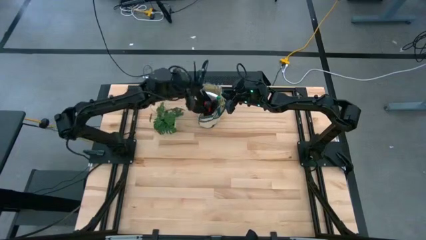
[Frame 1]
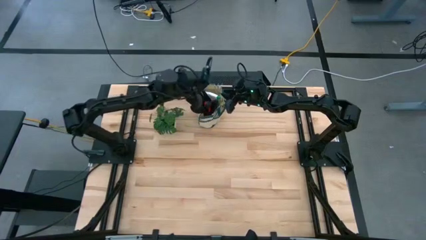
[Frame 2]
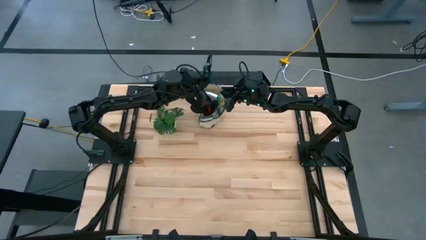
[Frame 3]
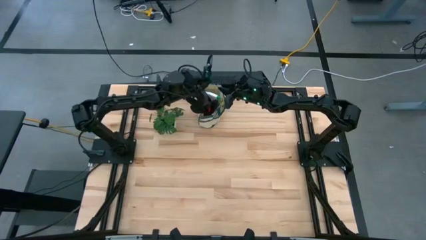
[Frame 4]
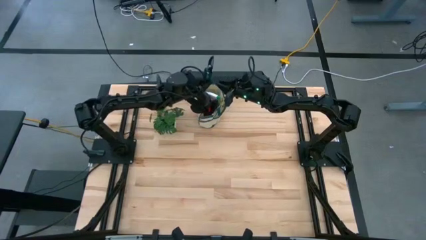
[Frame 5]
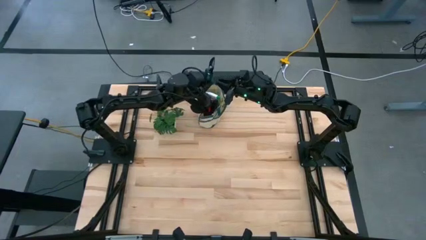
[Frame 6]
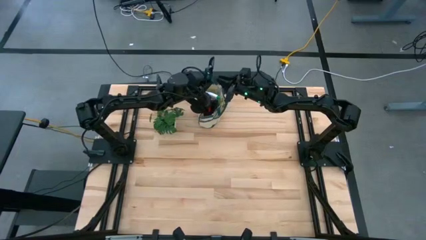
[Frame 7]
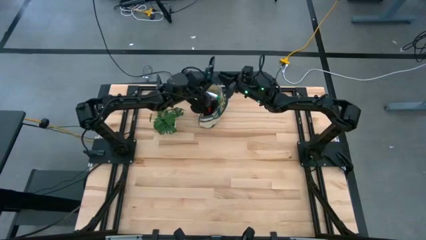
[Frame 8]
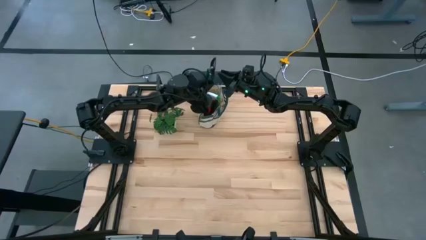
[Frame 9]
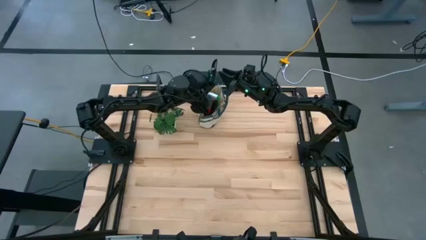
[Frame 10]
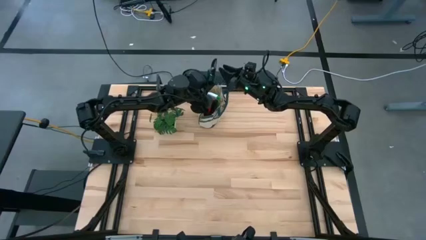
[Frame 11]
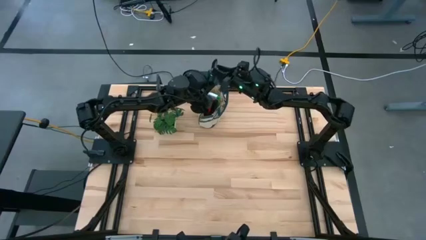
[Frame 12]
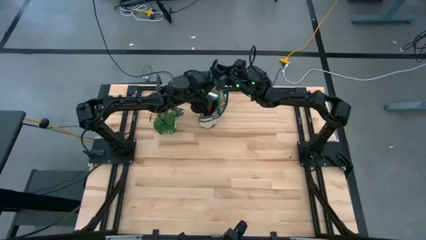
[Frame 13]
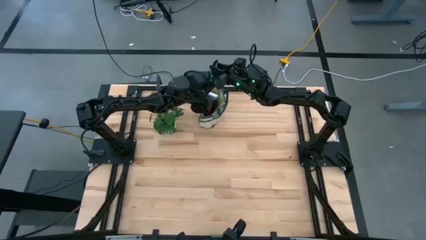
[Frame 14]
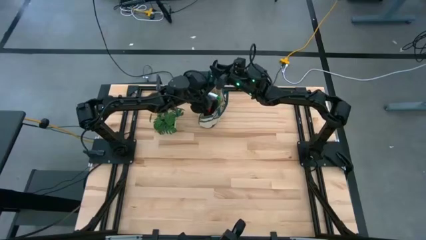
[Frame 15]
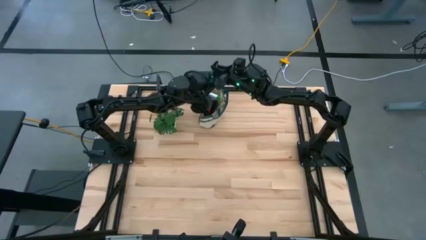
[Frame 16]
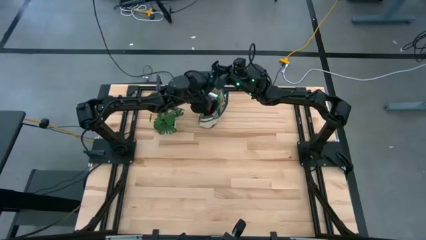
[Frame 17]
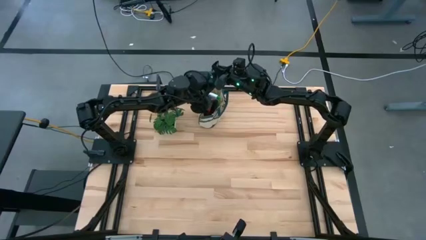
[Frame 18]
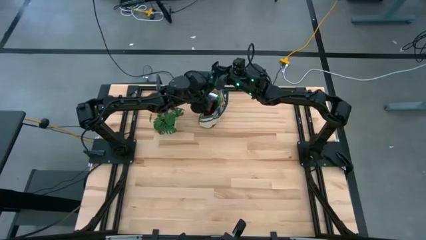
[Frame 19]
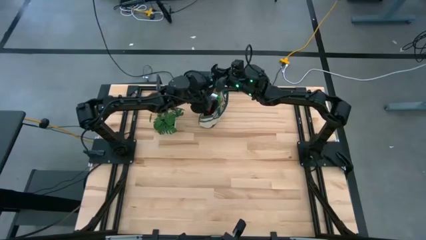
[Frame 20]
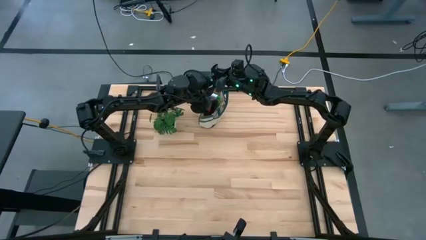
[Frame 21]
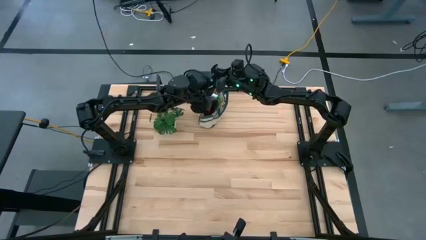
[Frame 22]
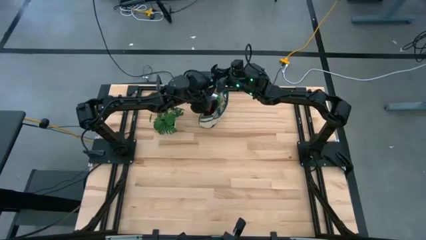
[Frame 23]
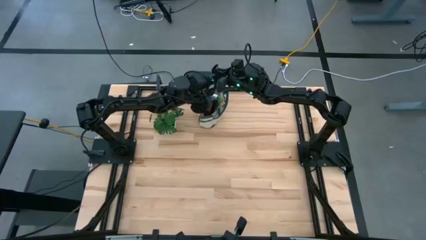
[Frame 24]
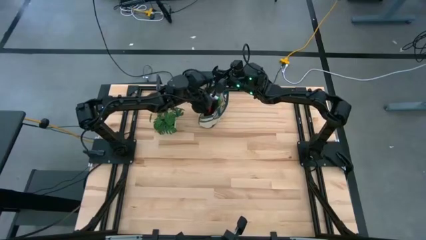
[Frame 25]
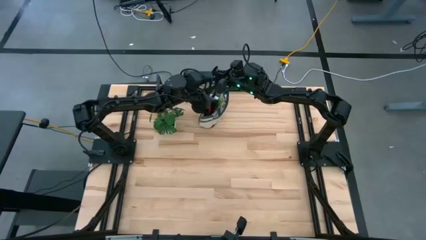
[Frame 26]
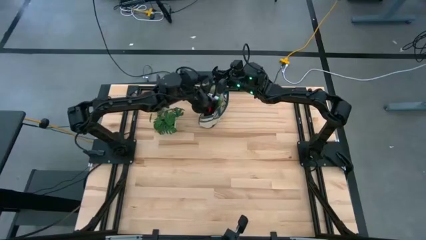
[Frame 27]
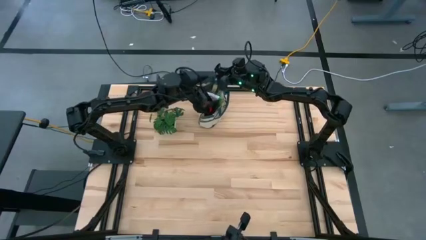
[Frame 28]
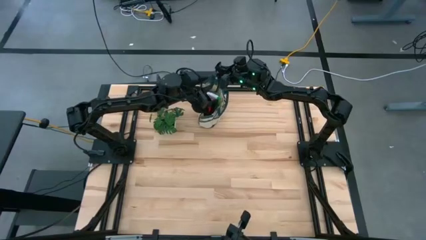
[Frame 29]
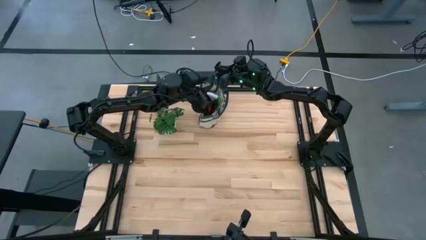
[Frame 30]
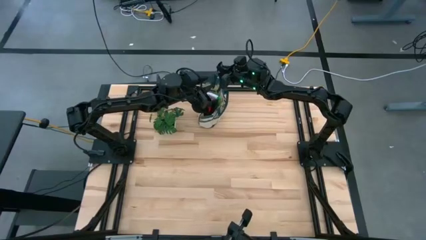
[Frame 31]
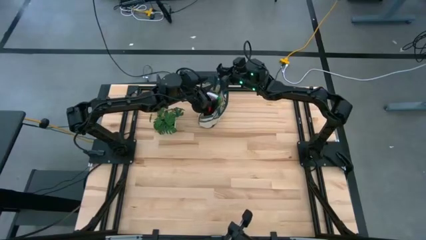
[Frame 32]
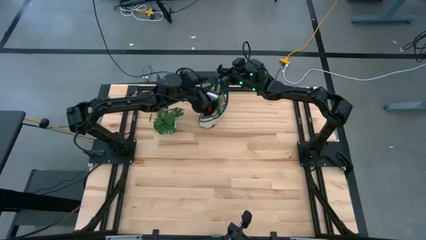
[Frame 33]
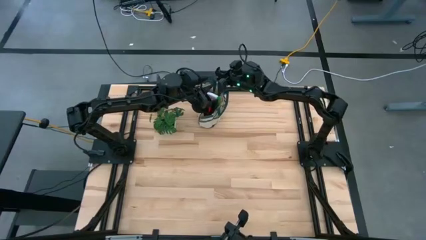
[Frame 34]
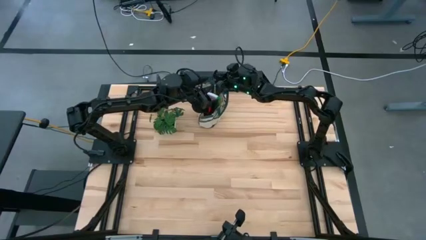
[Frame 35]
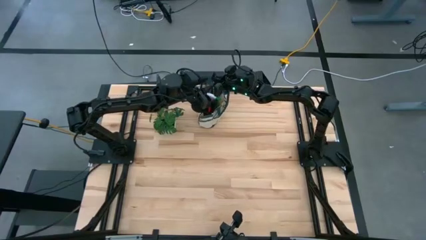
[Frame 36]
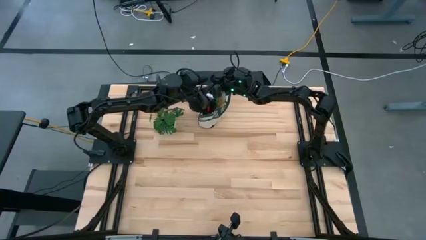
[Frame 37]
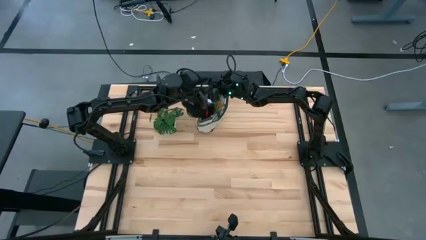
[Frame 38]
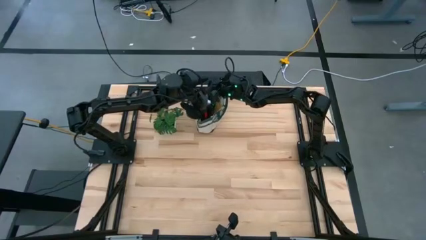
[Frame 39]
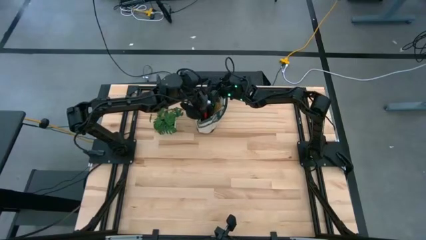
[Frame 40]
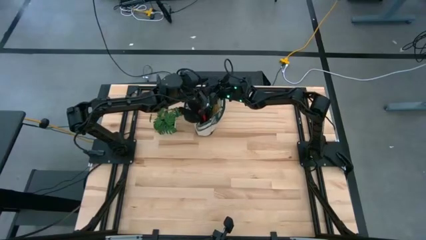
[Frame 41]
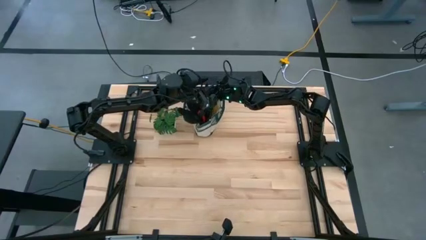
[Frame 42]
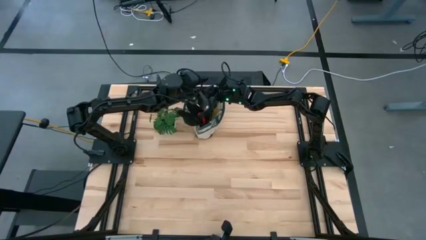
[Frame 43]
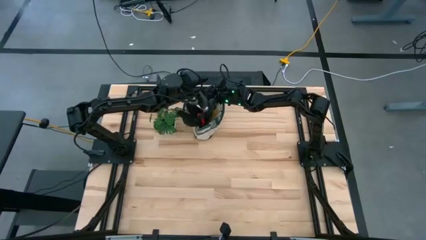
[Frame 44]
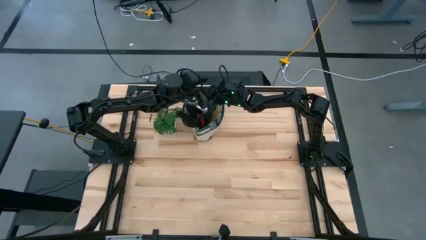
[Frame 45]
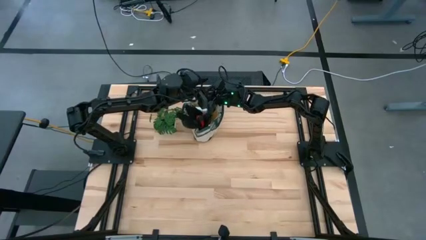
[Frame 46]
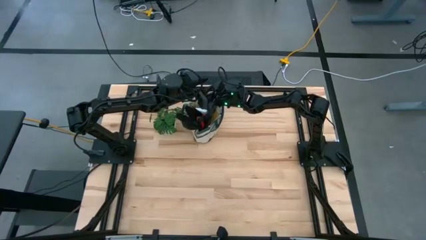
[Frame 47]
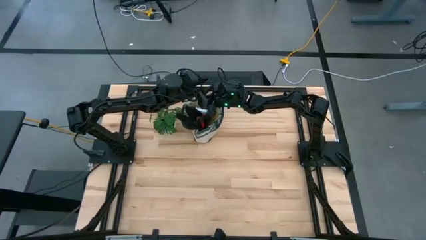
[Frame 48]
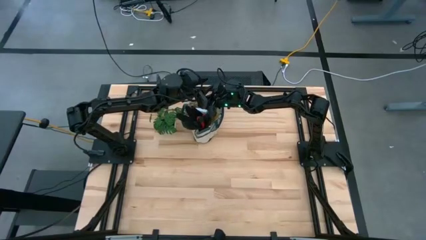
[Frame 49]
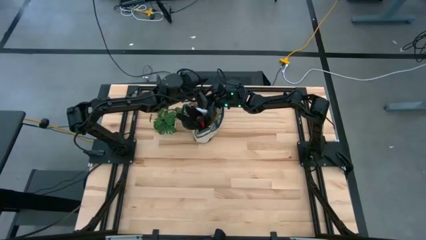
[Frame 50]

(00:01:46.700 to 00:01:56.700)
Task: Pick & Place Garden tools in Gardening bag
Put the green shear scissors into the white gardening bag

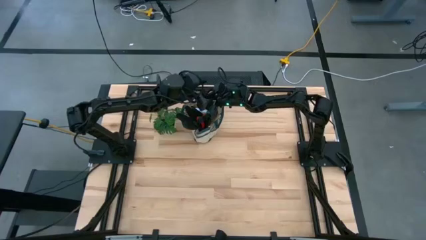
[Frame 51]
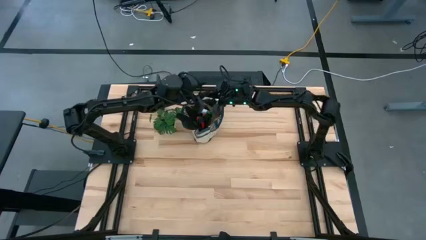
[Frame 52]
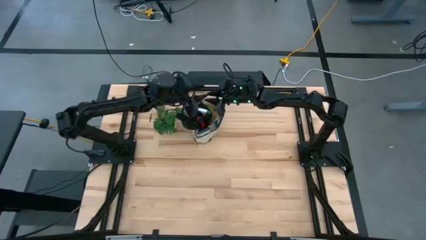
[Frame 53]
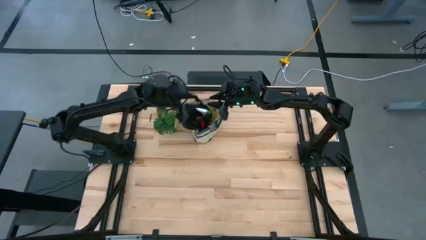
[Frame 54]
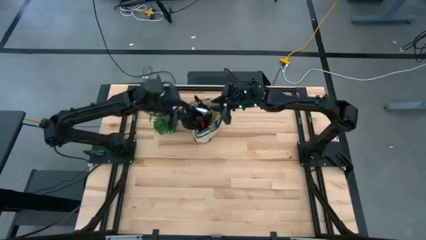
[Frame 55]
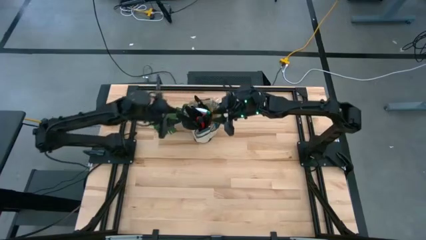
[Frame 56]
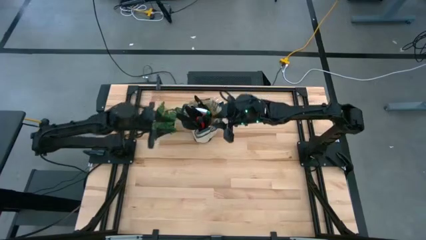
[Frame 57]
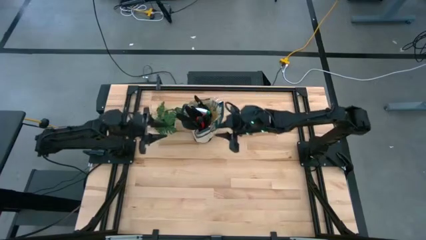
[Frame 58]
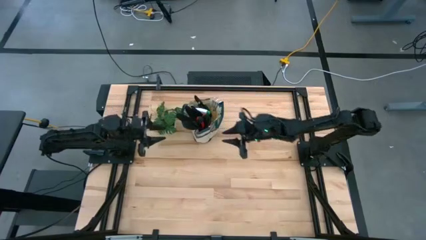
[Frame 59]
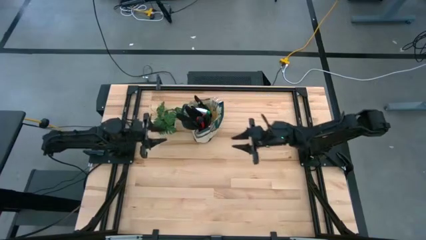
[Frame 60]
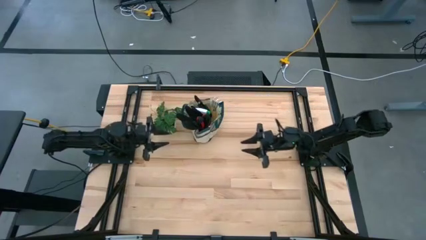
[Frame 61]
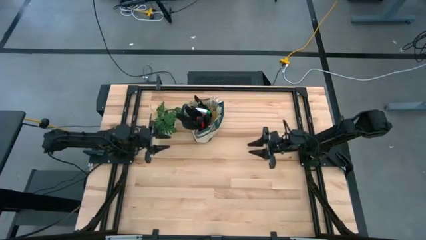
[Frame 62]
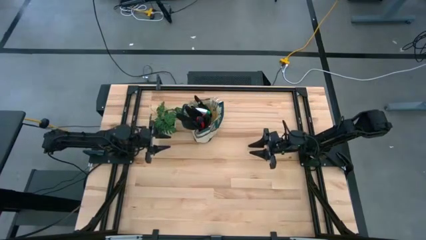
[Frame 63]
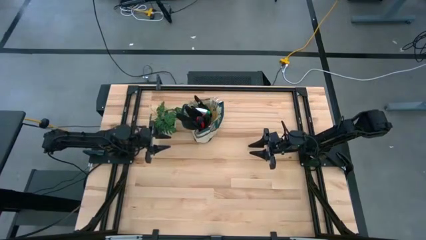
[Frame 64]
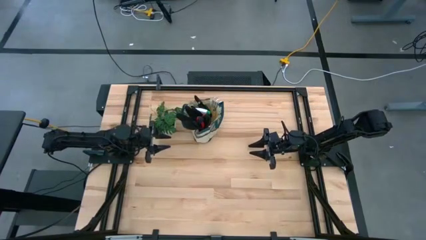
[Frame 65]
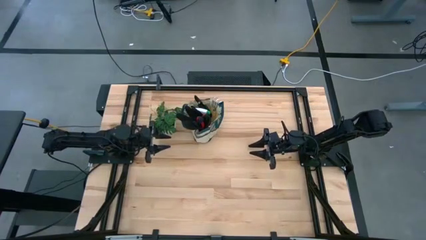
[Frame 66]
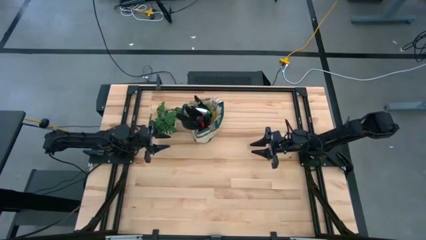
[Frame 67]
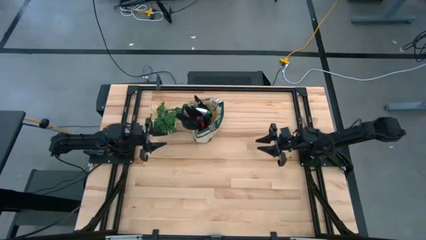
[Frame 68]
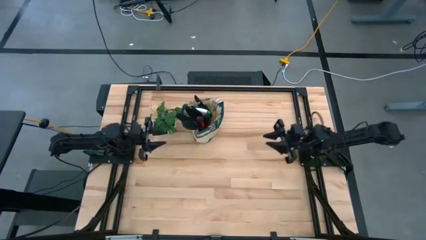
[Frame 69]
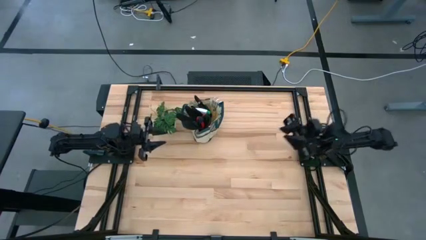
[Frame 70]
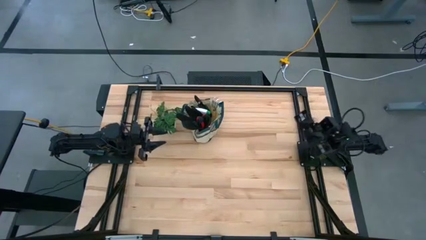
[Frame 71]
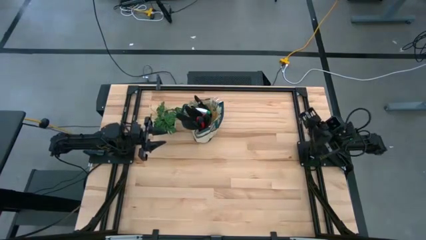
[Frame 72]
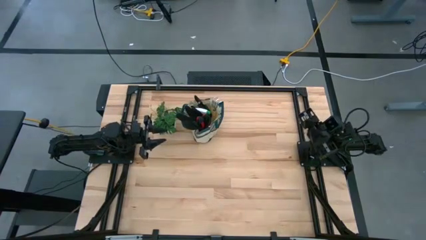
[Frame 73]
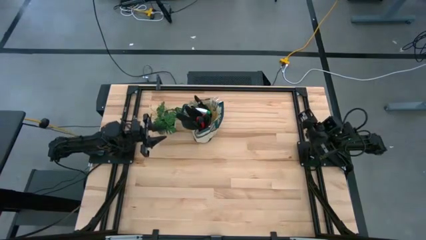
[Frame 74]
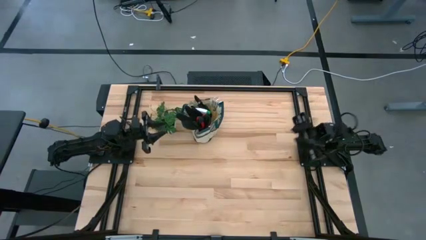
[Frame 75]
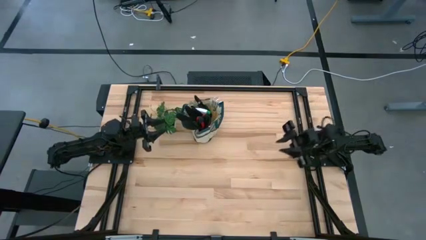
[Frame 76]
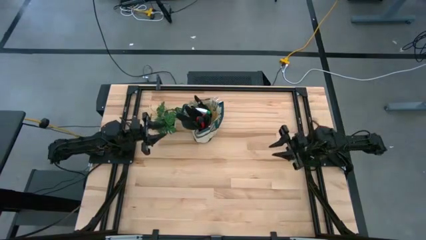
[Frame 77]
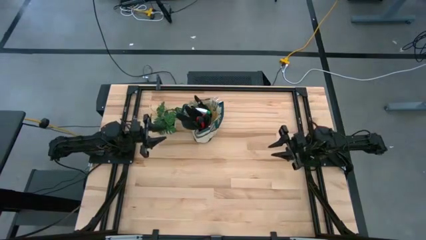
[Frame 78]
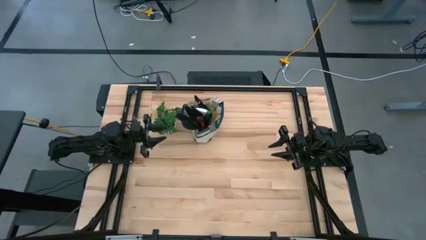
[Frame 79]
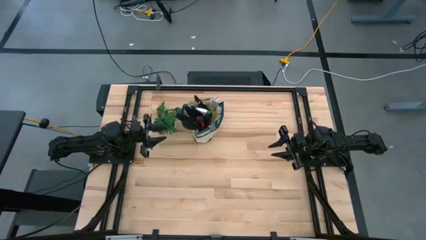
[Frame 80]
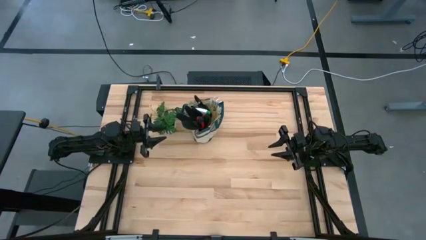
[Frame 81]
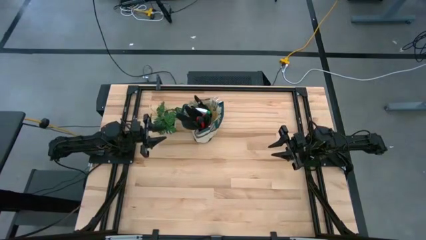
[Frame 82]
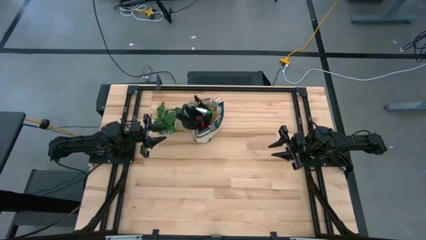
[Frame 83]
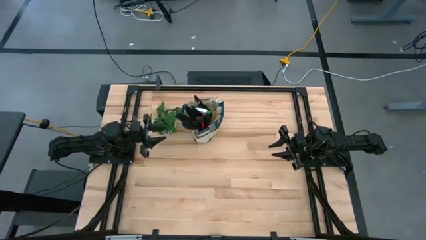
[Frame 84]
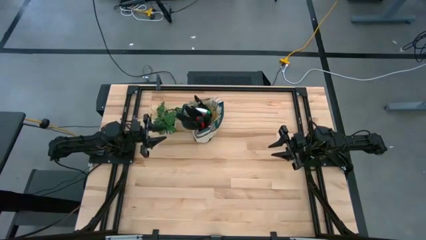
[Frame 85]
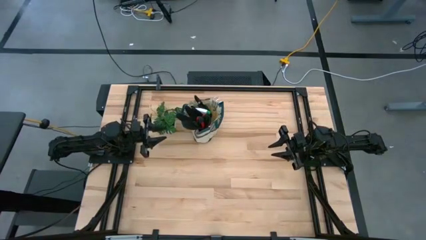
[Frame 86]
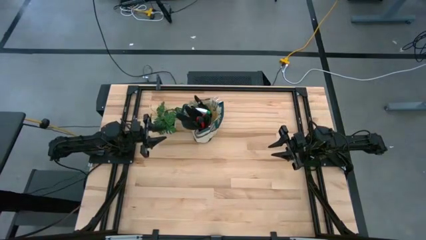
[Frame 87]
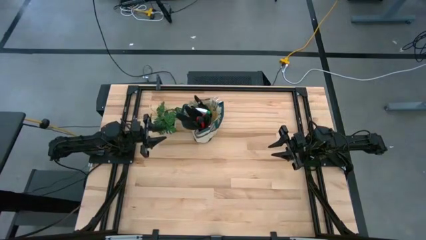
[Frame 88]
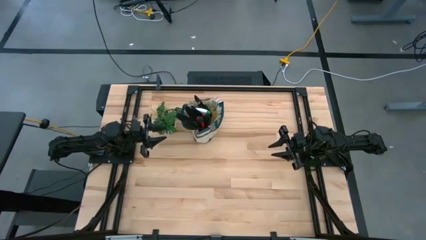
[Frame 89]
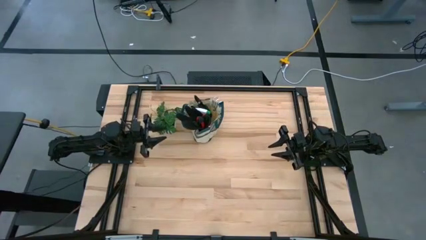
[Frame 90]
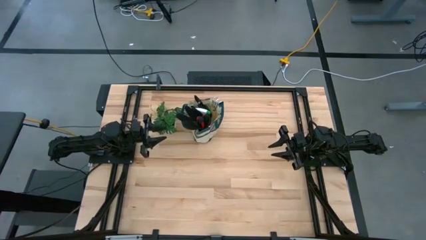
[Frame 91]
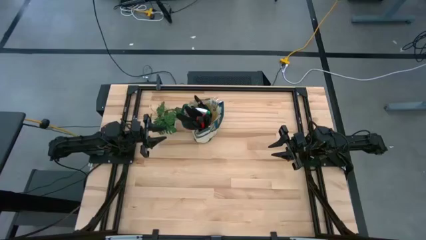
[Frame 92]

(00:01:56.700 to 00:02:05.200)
Return to Home Position
